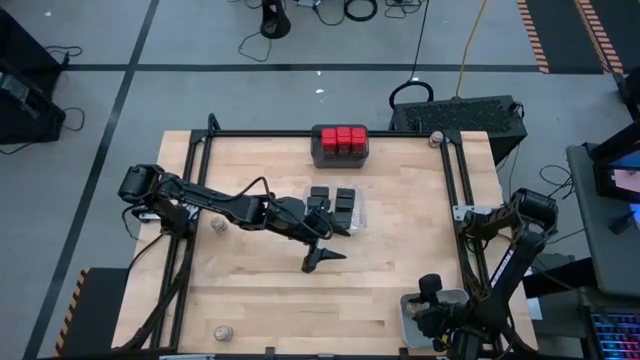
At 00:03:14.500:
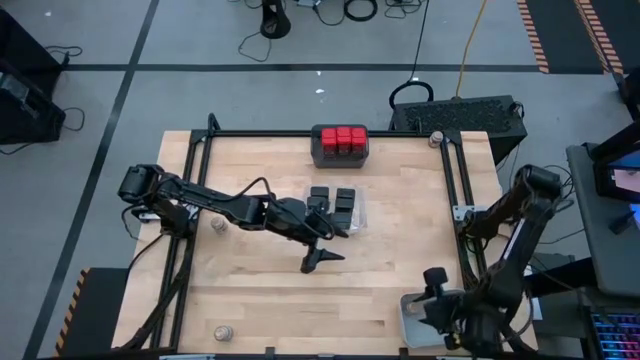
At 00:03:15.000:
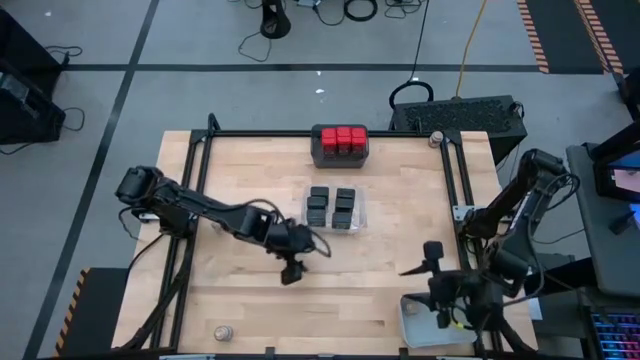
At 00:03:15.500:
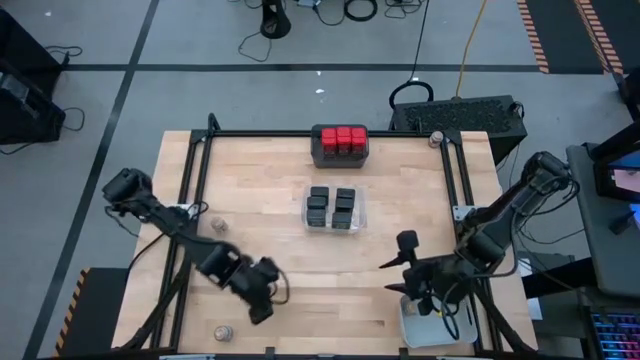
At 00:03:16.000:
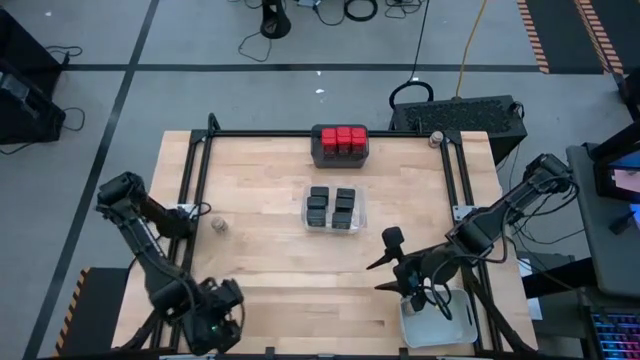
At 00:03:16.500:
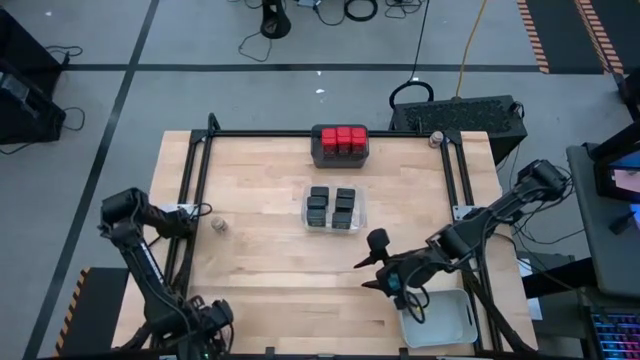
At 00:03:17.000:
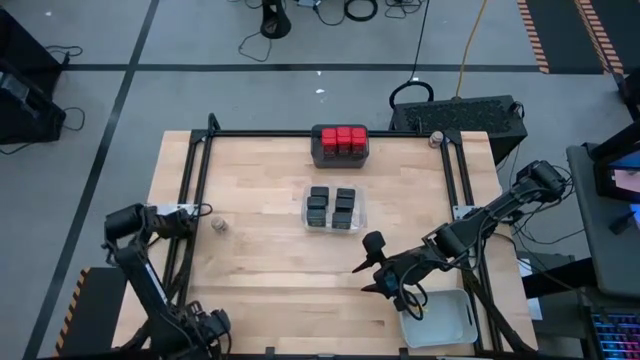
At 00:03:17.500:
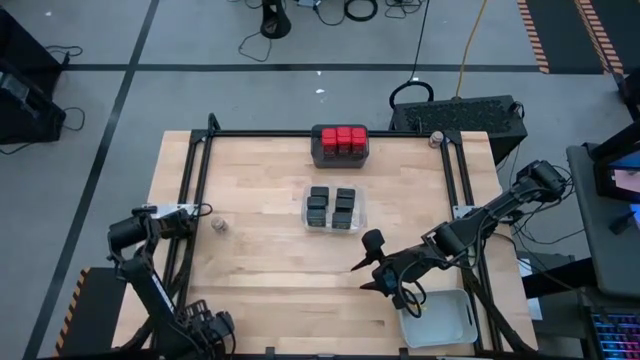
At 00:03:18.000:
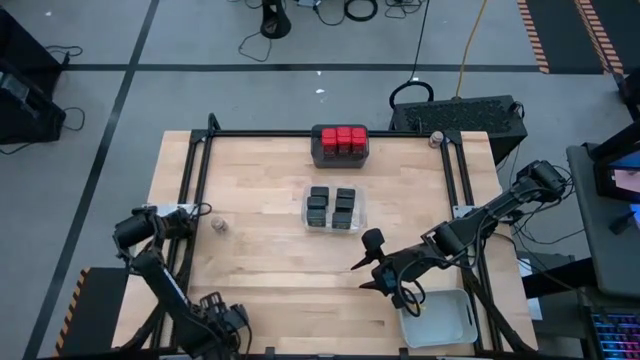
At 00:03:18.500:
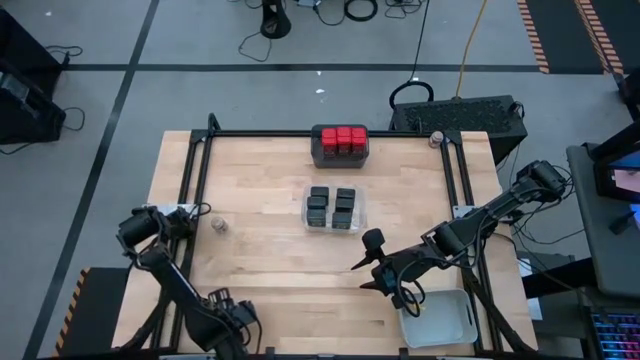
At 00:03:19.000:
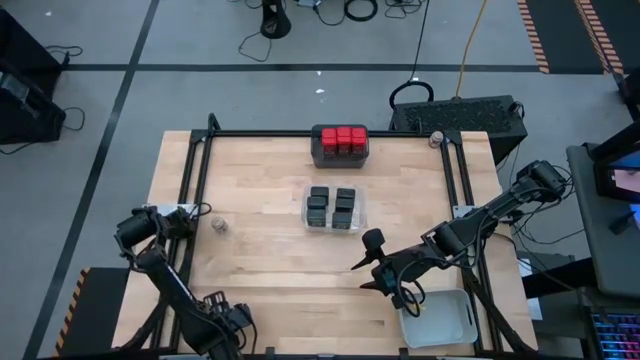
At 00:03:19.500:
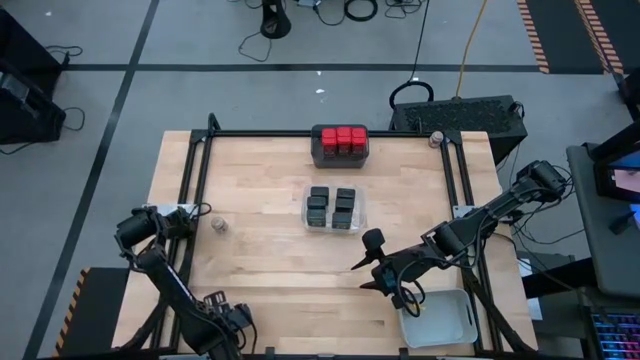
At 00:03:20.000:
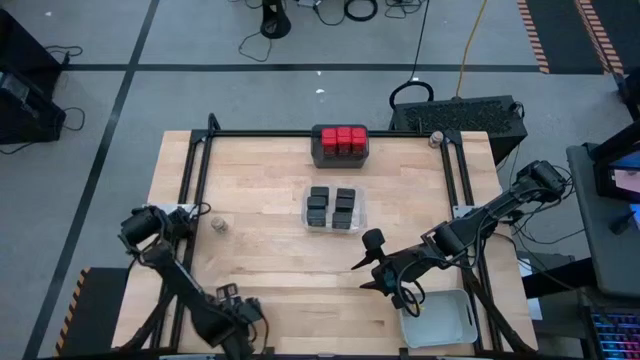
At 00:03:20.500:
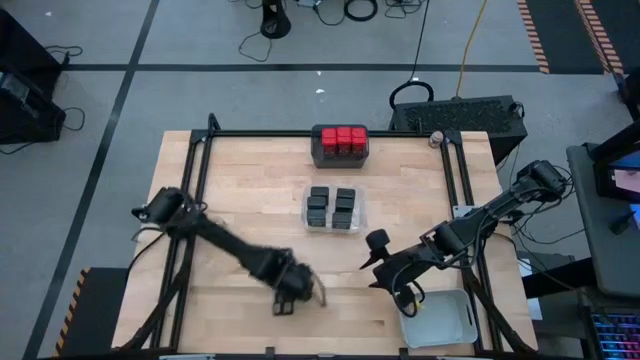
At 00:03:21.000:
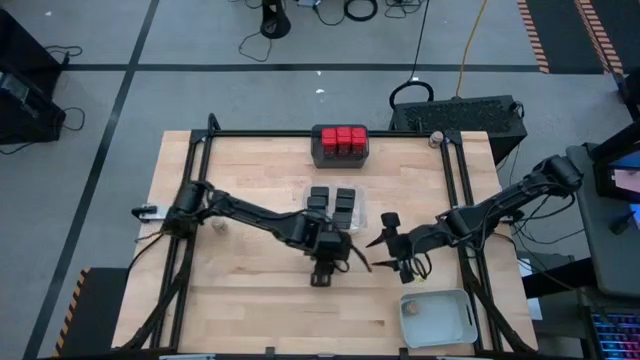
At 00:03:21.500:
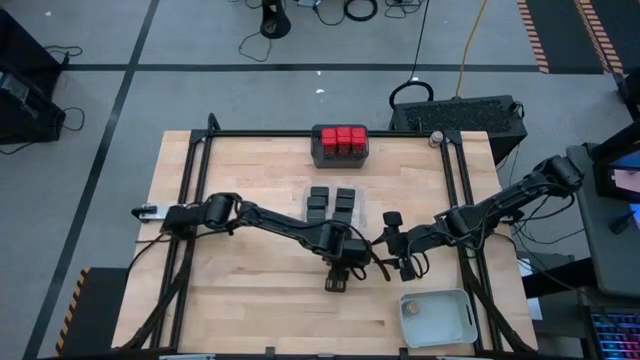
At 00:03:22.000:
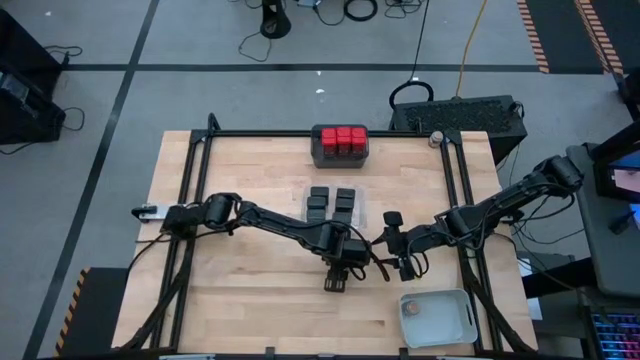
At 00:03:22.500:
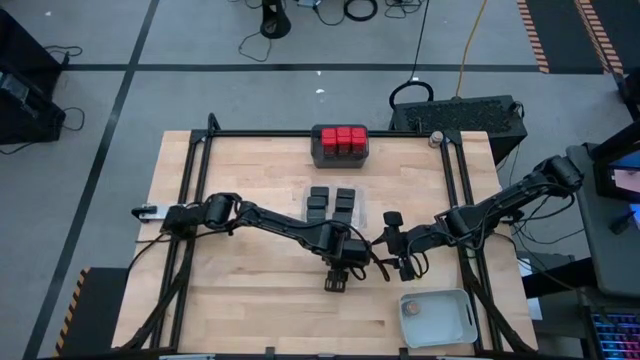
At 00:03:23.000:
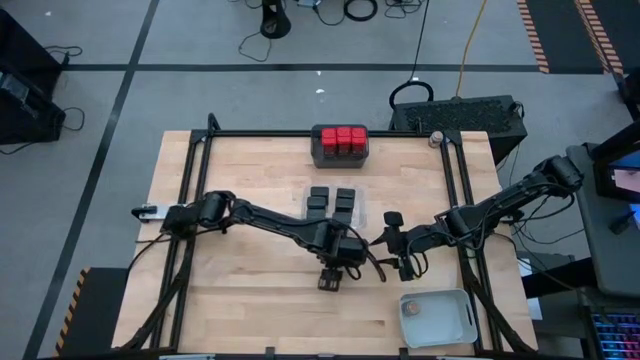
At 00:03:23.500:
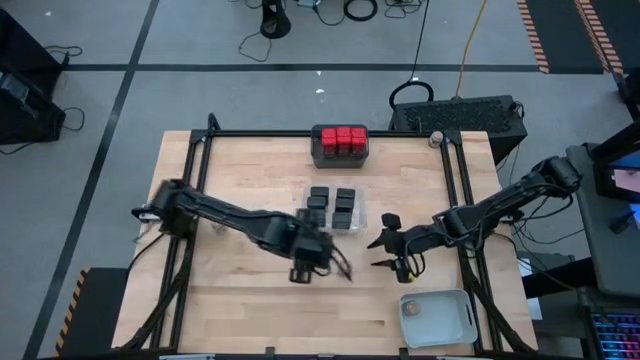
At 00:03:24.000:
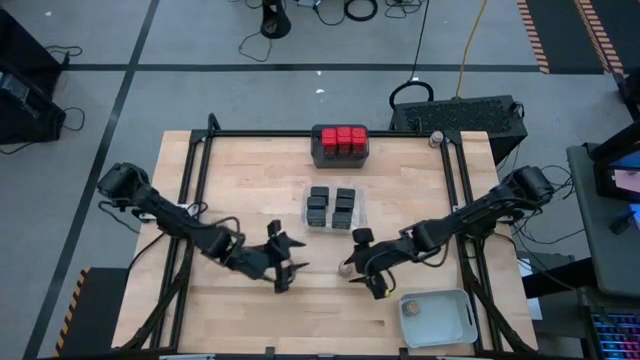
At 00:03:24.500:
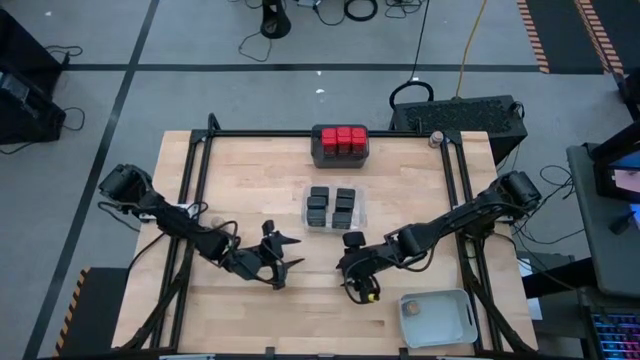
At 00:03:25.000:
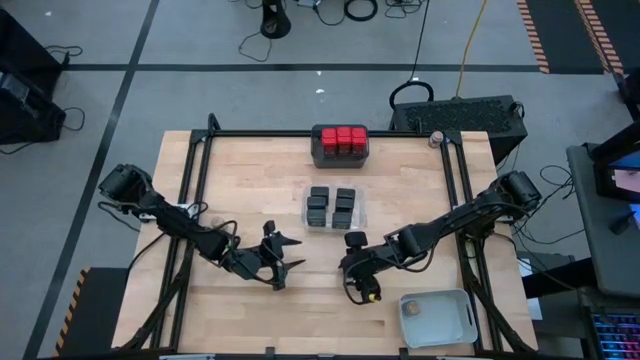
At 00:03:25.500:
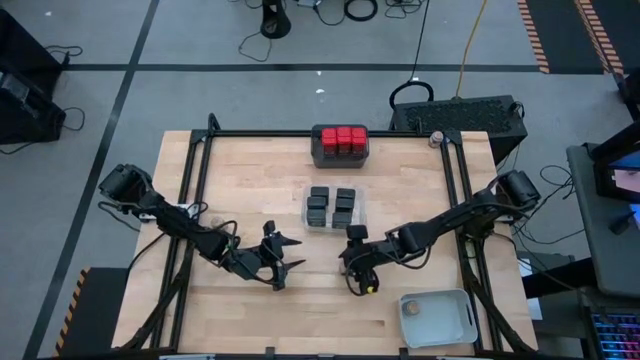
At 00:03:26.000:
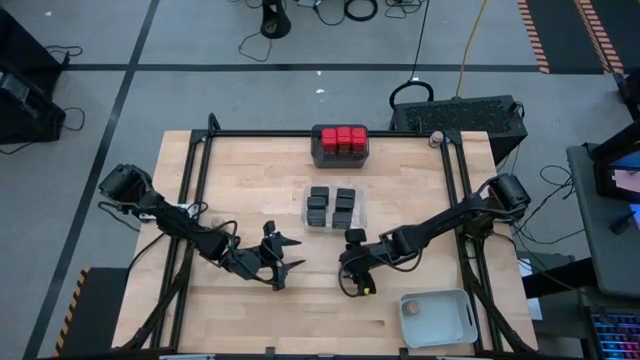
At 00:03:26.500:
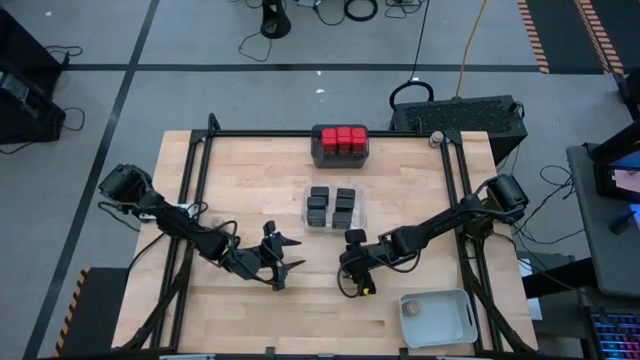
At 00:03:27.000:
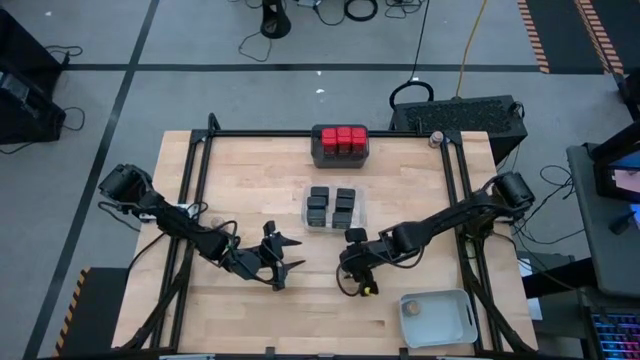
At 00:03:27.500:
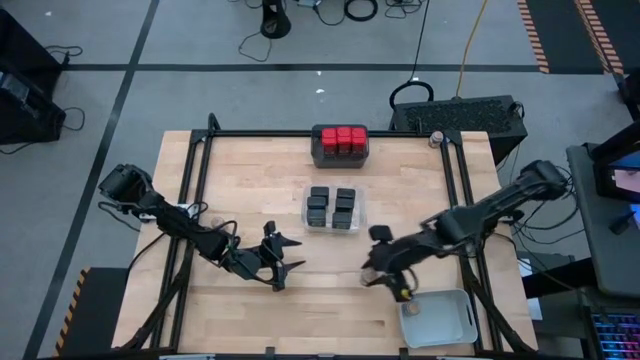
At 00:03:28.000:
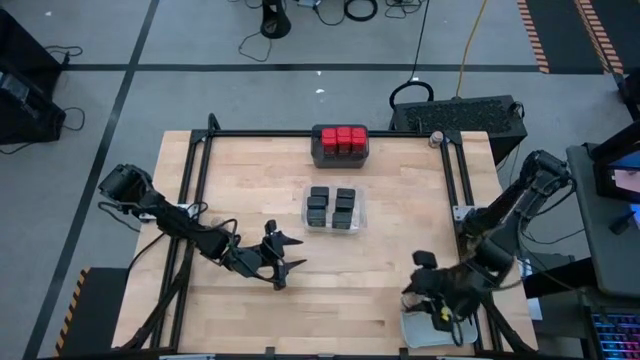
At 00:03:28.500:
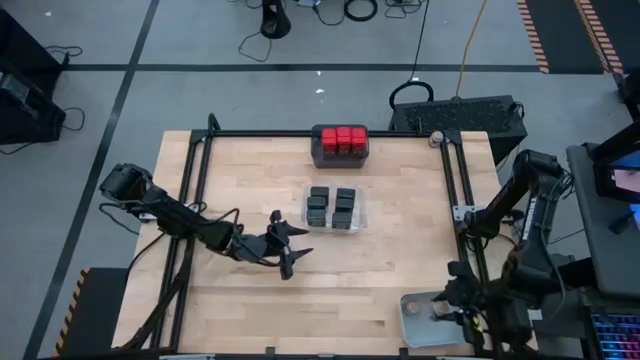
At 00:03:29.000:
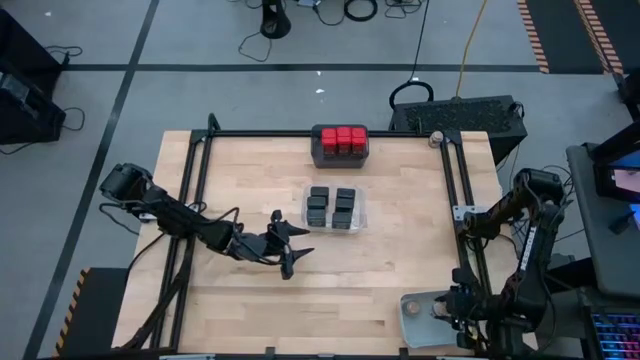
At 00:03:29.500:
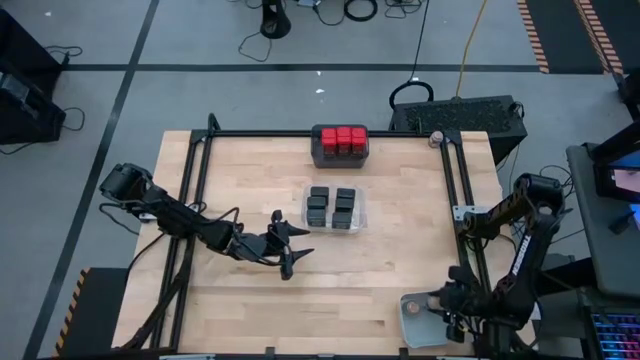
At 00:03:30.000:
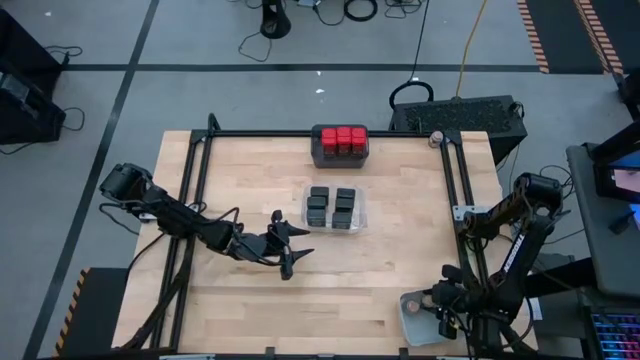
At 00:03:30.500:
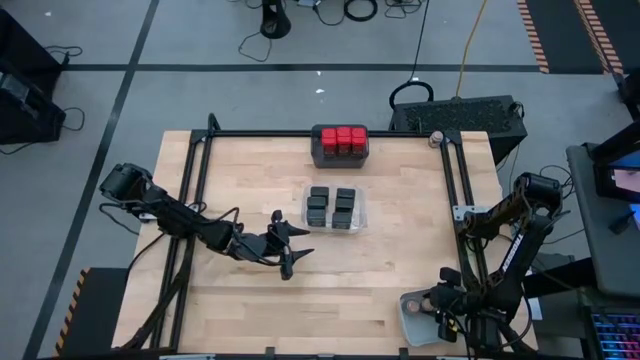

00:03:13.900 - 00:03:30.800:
Task: Sort spices by type
Put the brown seasoning into the white bin

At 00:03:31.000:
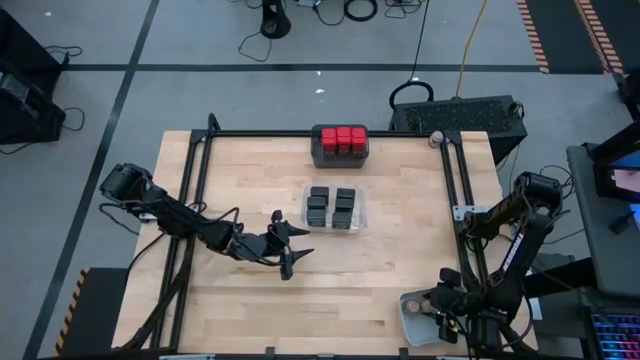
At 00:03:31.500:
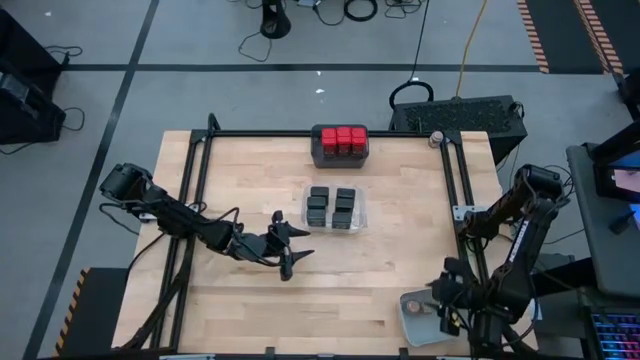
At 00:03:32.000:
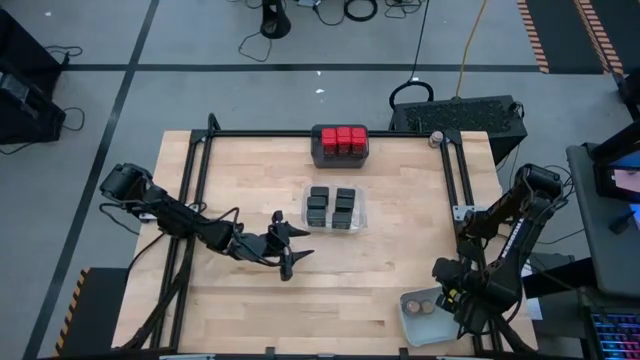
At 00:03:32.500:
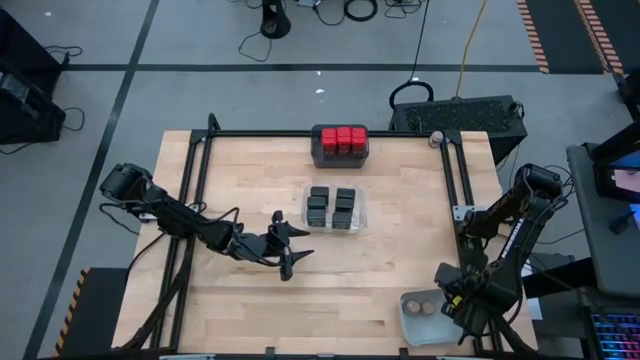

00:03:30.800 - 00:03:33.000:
Adjust the white bin on the table

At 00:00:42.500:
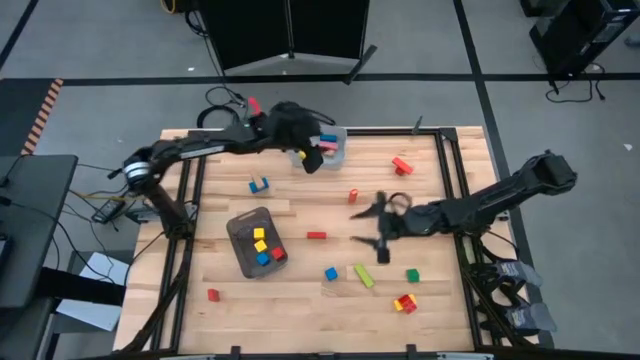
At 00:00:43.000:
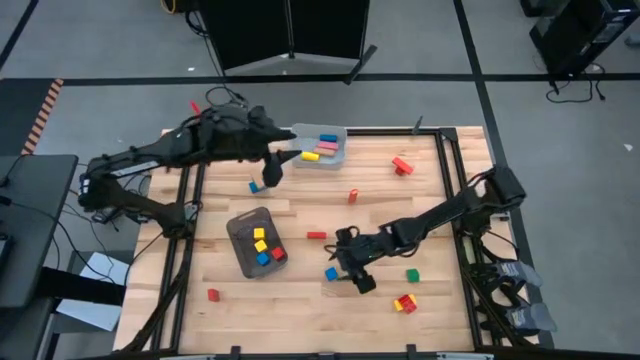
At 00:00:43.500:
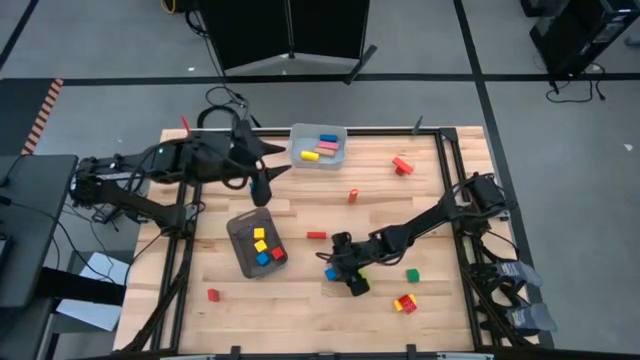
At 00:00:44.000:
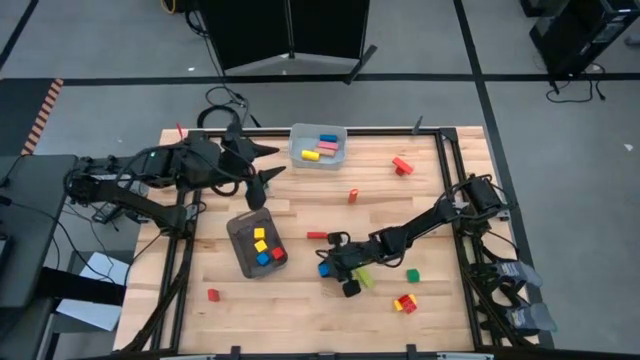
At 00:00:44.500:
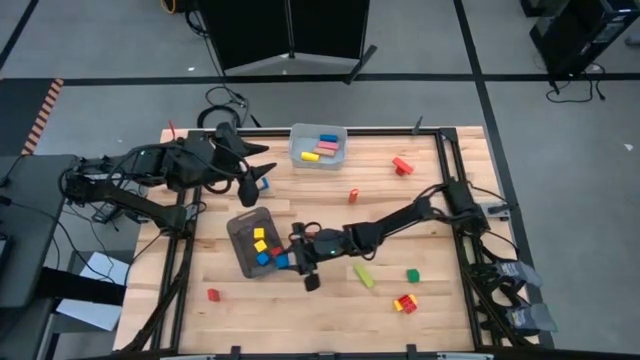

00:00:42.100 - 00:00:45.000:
Task: Sort blocks by size
Put the blue square block into the black bin
